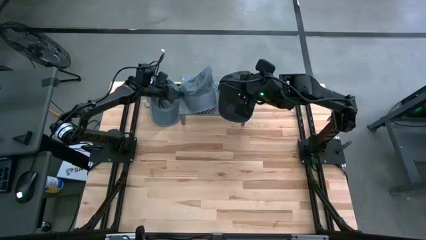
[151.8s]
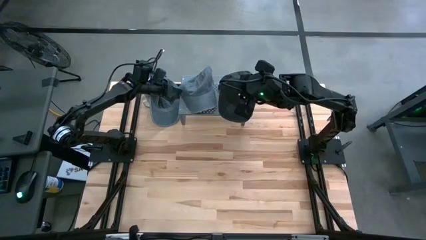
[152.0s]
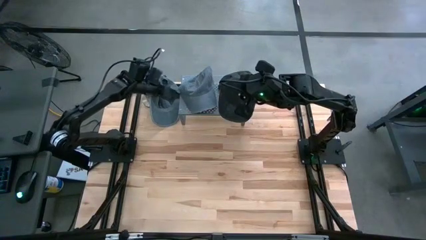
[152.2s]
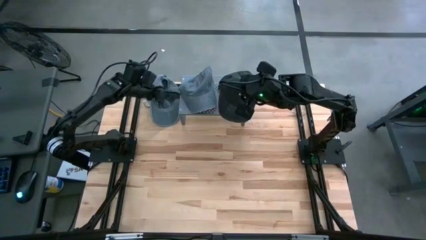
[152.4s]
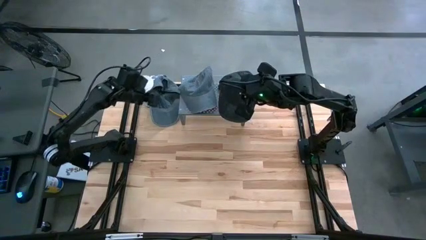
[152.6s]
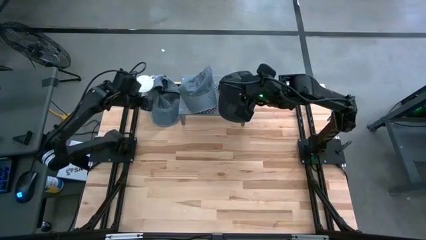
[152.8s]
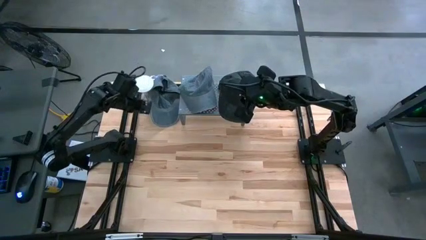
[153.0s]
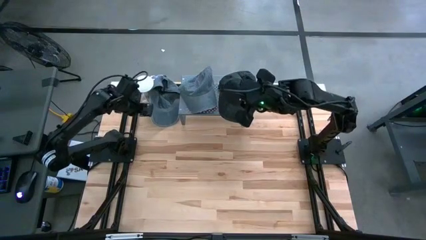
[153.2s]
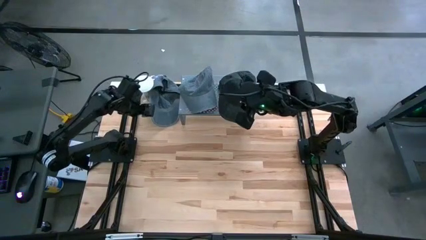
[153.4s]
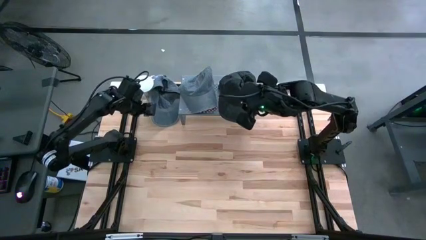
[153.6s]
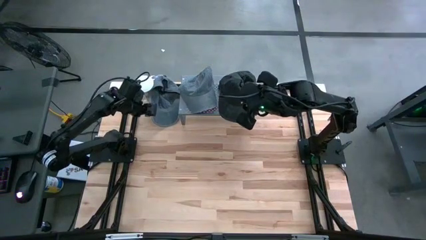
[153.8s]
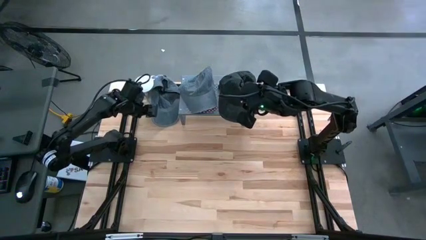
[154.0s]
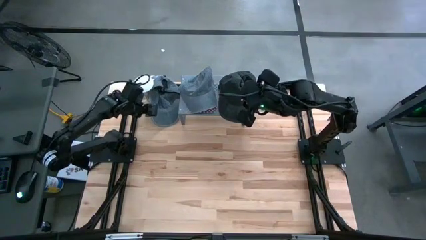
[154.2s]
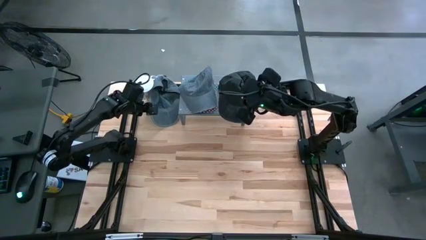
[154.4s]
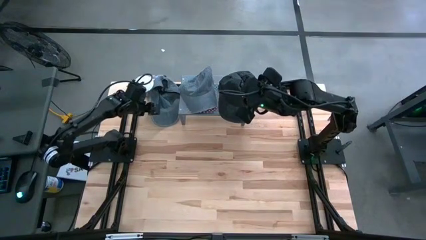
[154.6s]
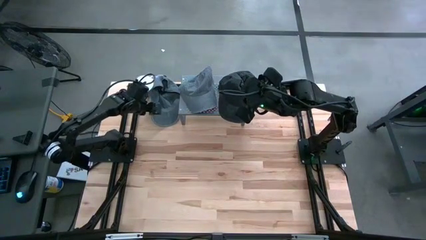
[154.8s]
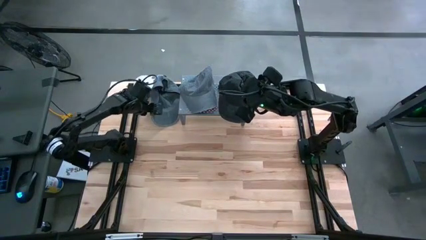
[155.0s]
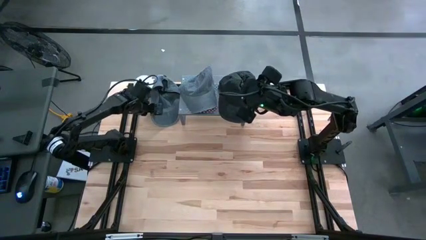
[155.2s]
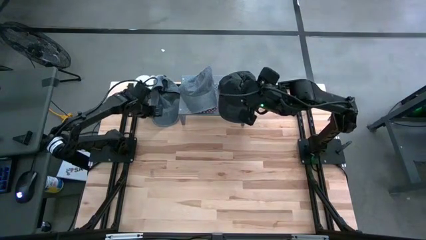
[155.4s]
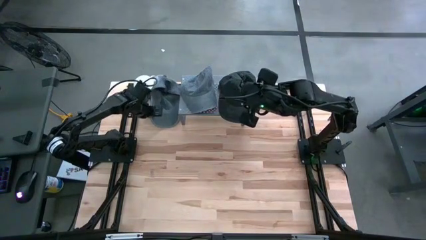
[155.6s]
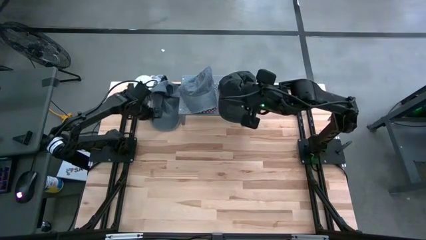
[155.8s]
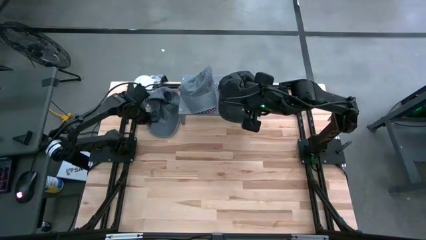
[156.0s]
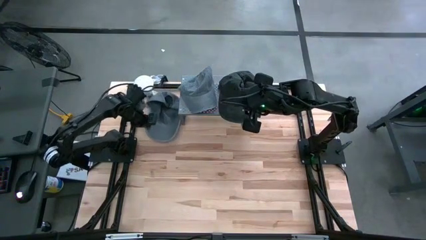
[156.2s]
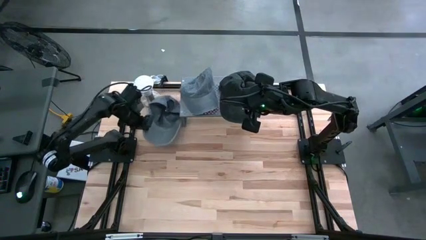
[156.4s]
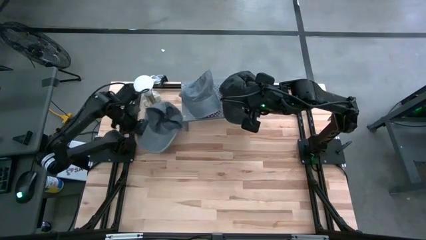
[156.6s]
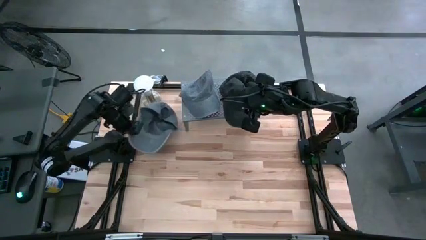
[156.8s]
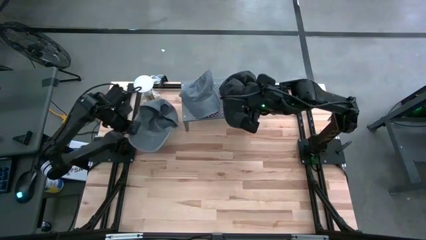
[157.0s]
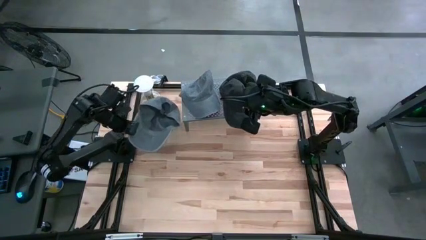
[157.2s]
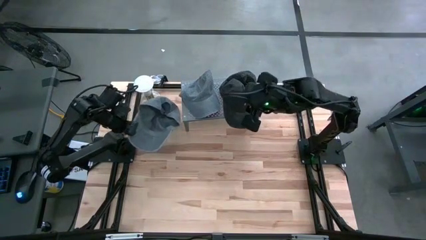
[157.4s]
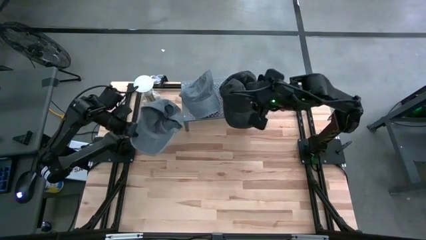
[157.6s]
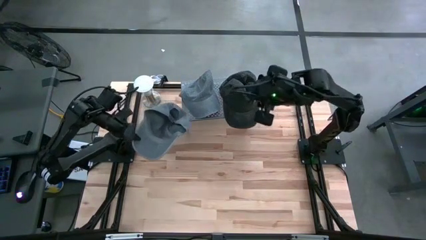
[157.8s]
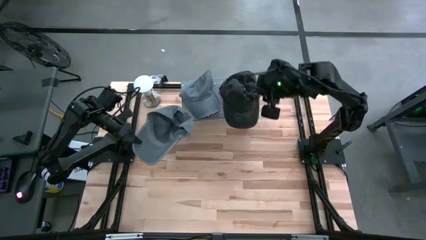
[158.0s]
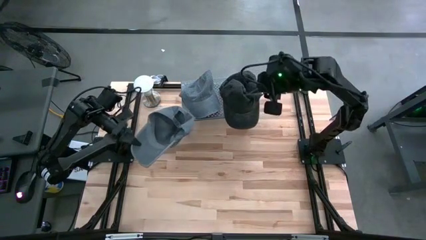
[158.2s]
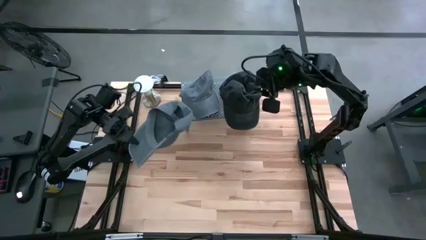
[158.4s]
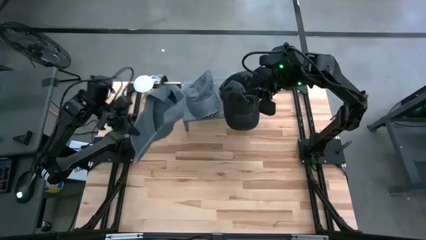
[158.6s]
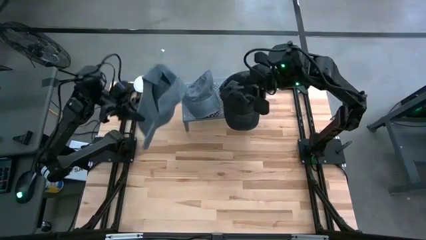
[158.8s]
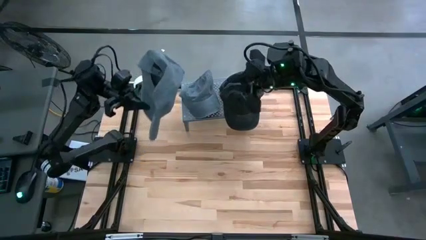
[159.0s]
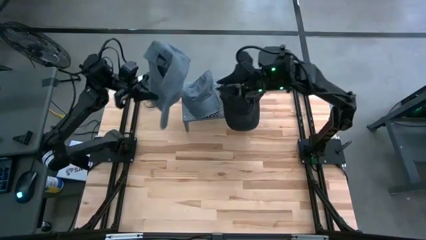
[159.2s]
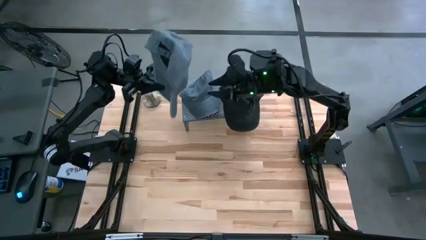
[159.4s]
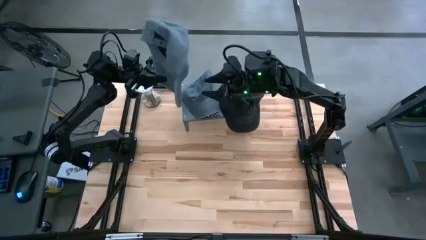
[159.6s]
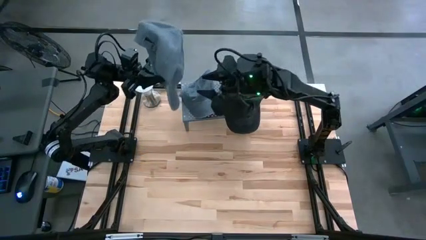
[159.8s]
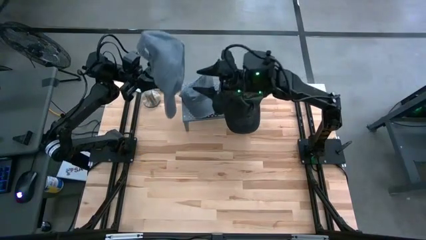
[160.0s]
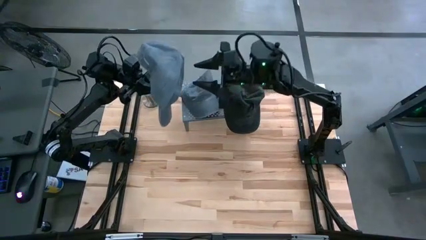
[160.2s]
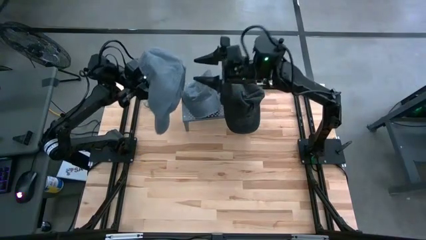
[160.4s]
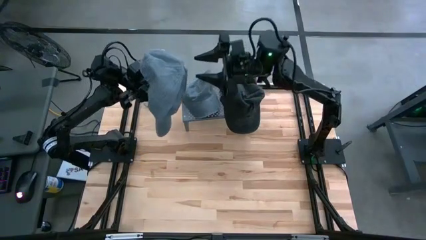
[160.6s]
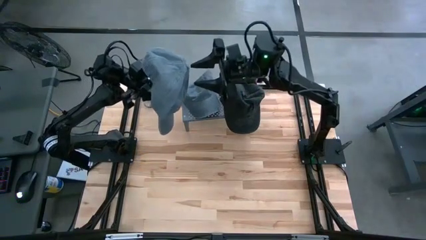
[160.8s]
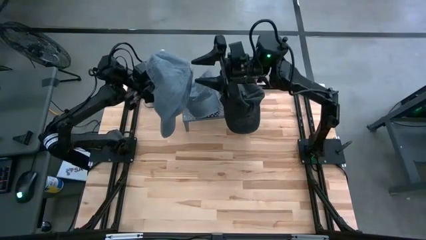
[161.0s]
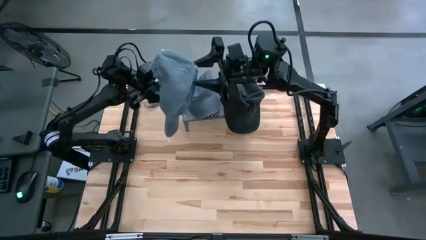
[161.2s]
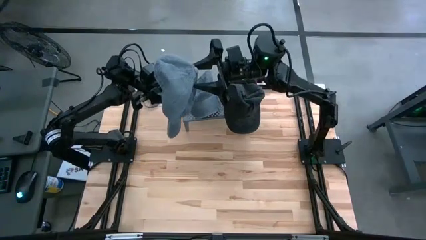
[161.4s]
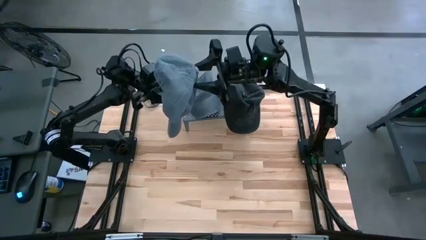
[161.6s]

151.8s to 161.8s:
Task: Pick & Place hat
Stack the gray cap on top of the other gray cap on the shelf

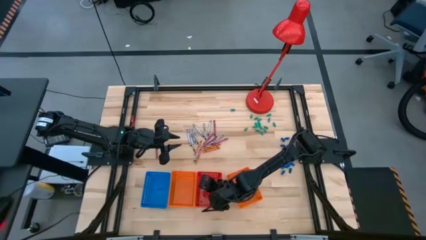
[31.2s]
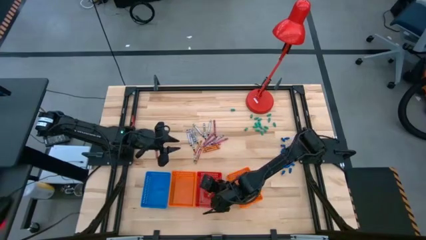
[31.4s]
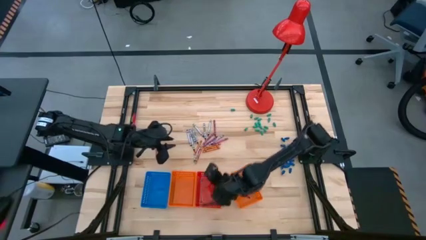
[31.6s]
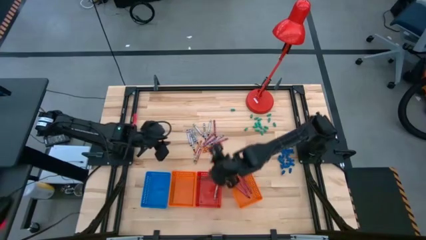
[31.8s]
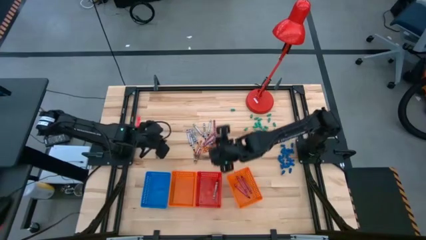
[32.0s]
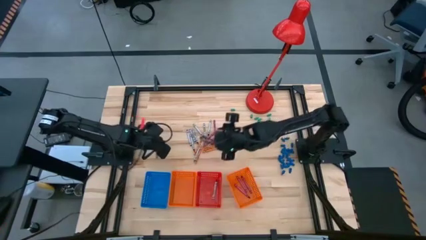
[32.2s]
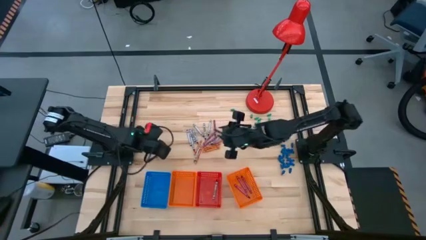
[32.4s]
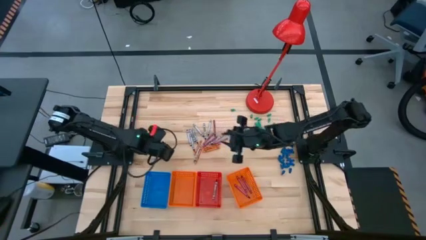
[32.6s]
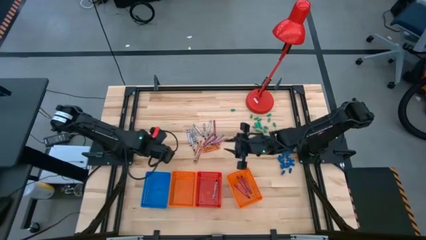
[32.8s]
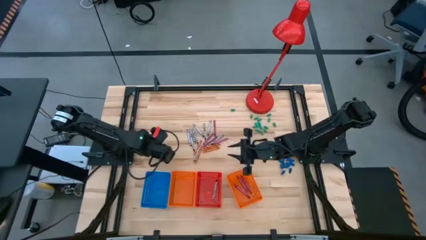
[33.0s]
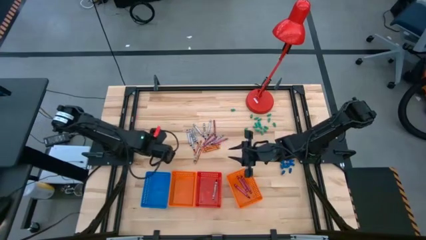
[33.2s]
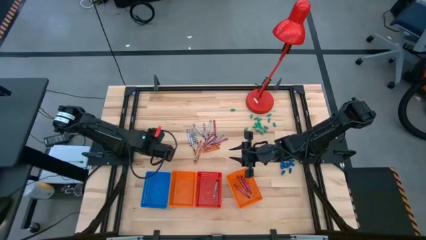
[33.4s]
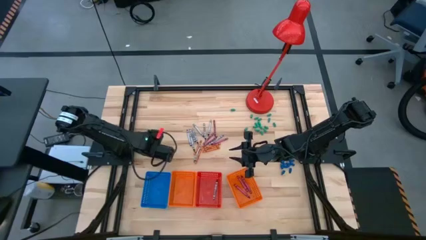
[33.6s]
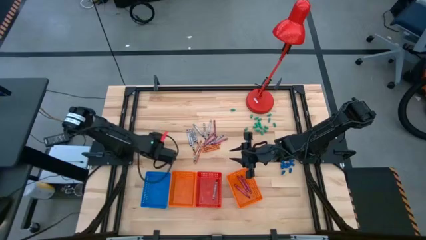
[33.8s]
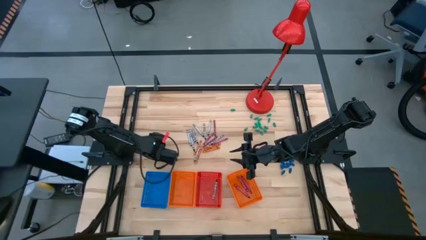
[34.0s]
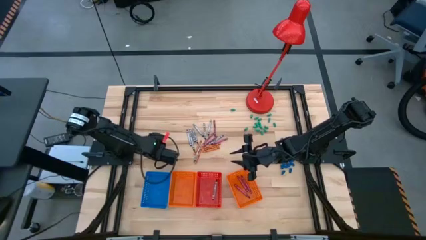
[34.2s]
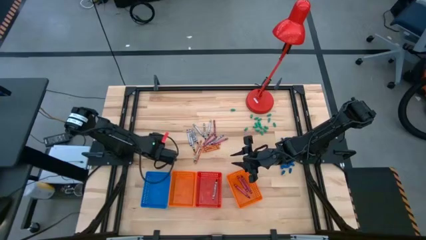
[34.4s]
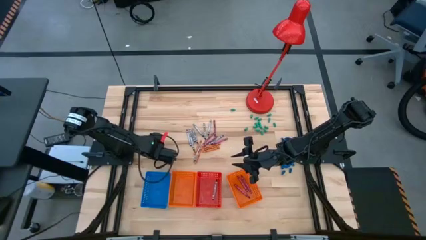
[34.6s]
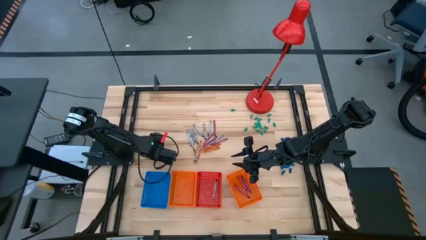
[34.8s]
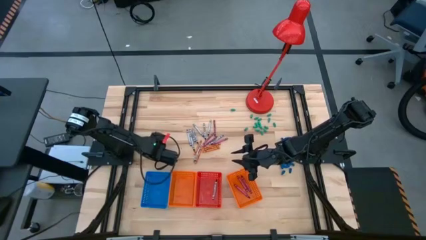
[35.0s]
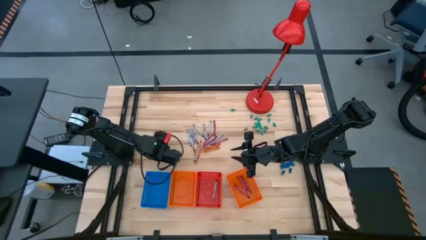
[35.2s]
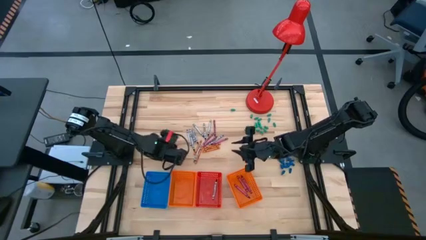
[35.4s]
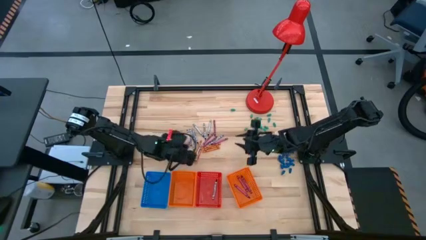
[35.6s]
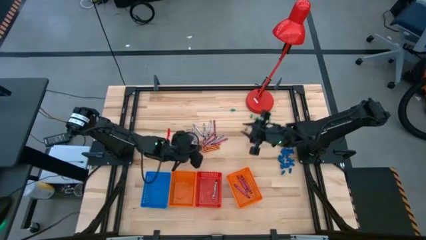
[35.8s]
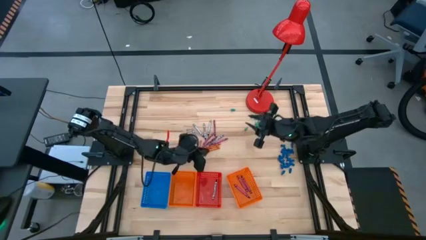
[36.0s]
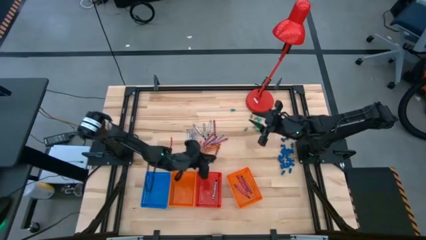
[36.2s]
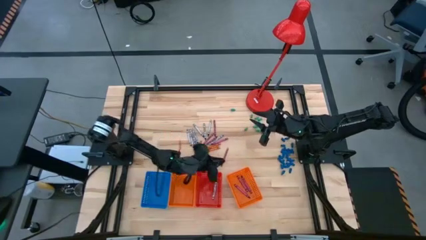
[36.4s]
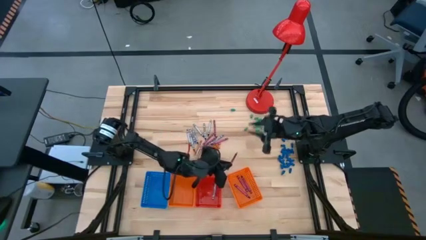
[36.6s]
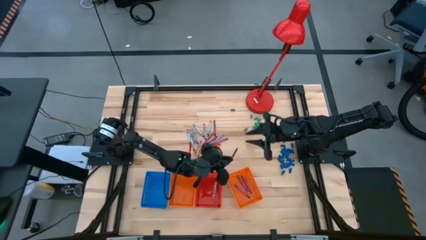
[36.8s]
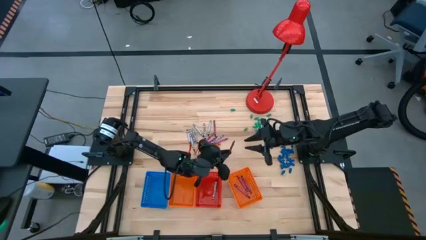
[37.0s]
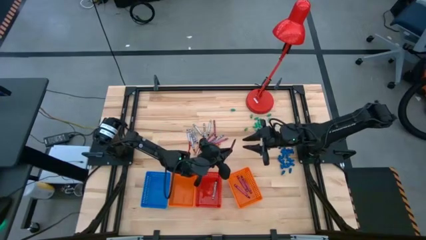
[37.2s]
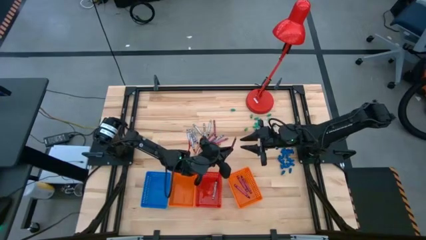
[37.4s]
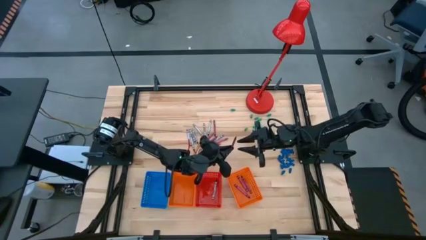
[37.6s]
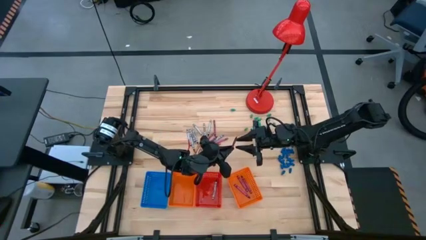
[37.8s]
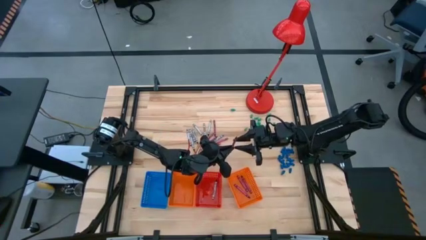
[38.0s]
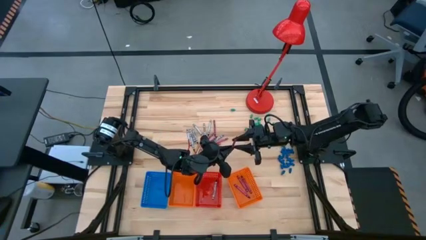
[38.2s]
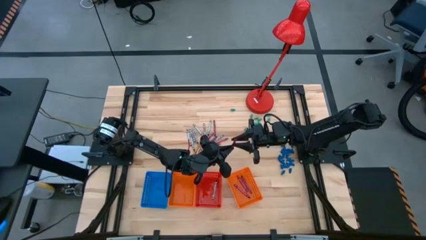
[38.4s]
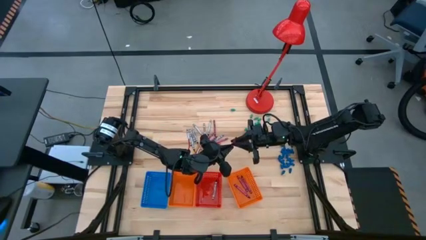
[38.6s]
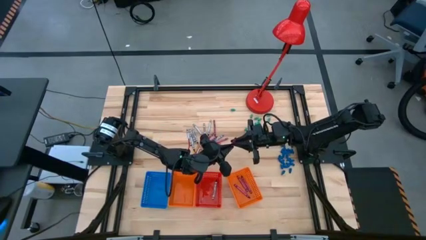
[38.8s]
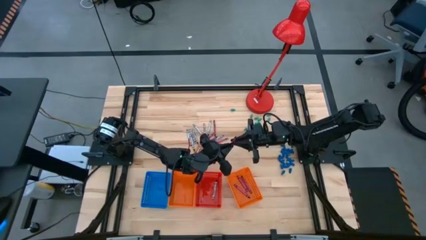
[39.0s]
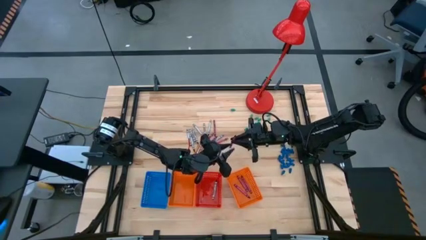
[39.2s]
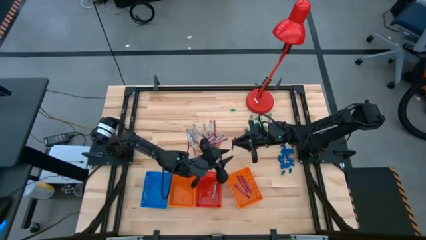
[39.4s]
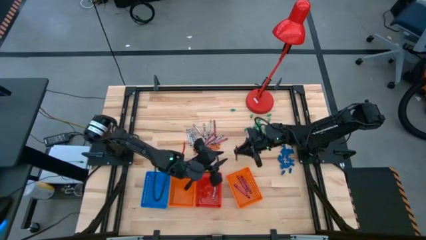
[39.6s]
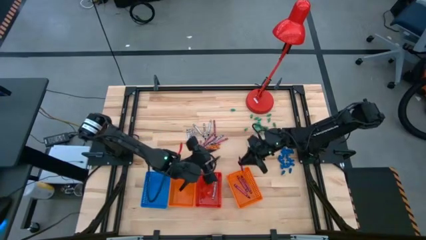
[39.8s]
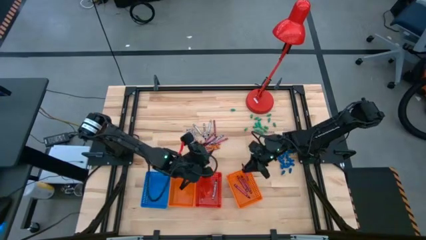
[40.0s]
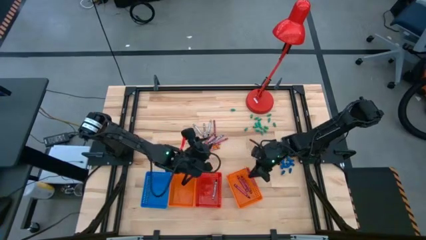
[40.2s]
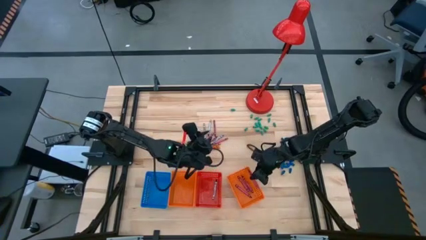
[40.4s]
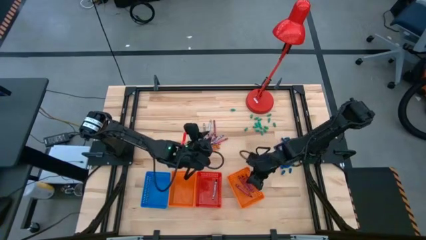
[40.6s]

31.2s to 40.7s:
Task: Sort crayons
Put the red crayon into the right orange bin
